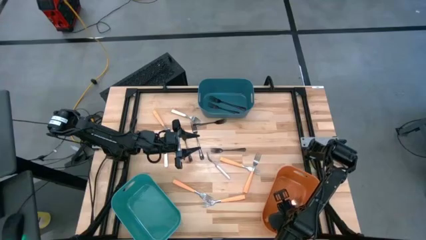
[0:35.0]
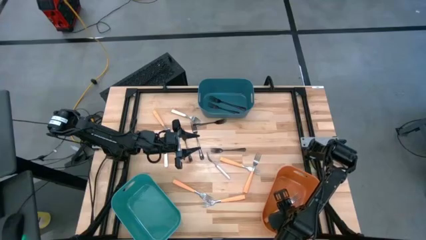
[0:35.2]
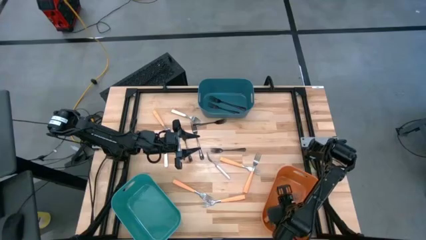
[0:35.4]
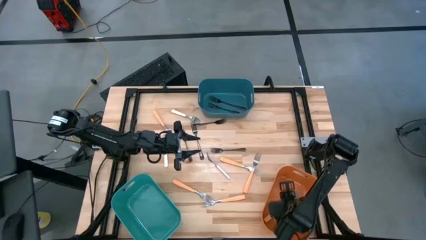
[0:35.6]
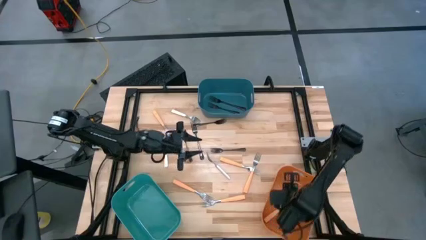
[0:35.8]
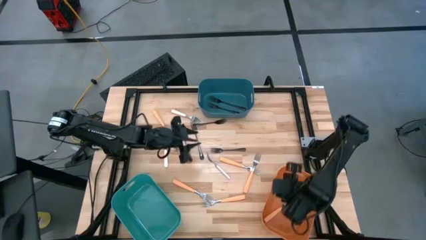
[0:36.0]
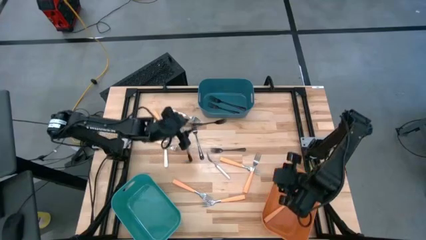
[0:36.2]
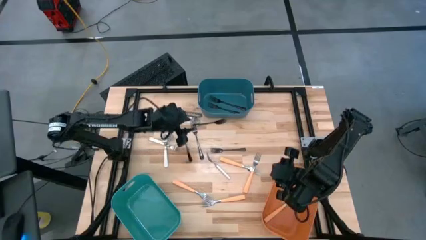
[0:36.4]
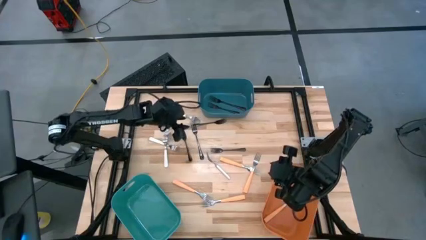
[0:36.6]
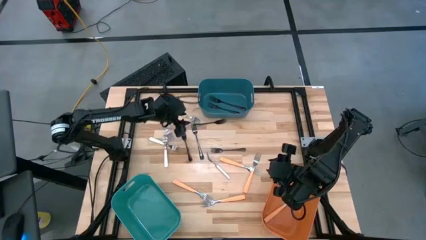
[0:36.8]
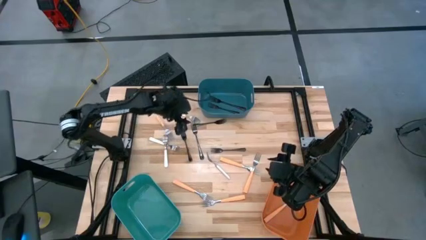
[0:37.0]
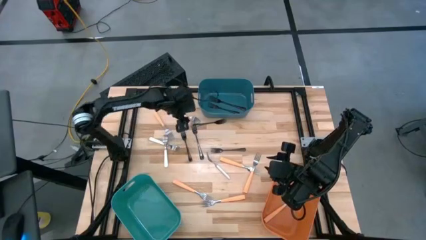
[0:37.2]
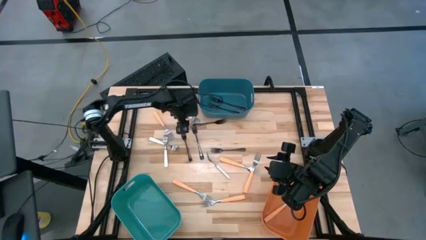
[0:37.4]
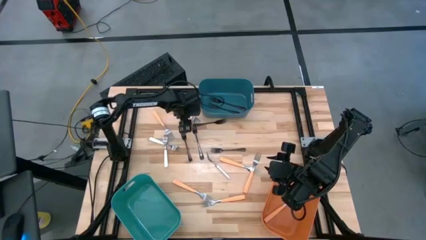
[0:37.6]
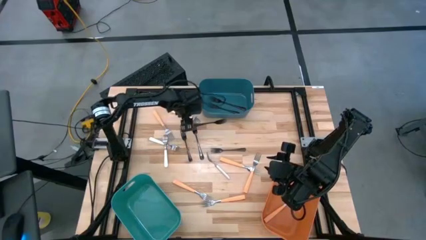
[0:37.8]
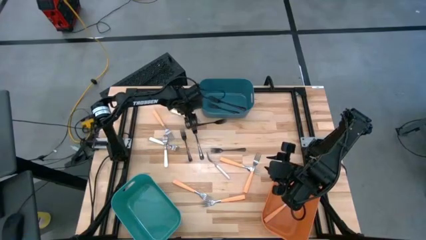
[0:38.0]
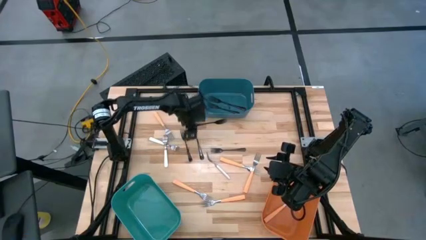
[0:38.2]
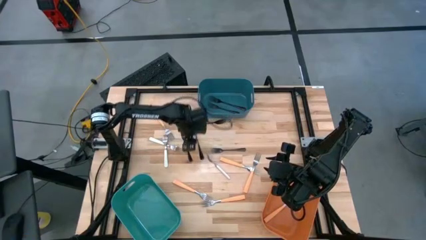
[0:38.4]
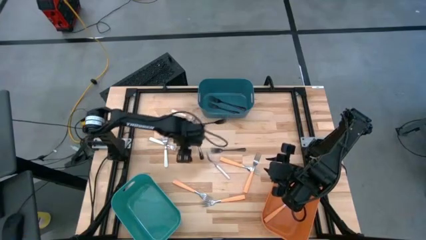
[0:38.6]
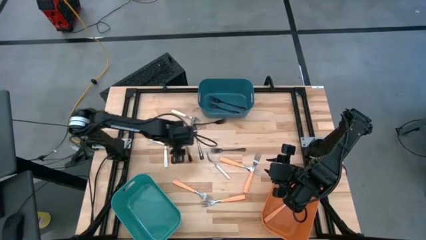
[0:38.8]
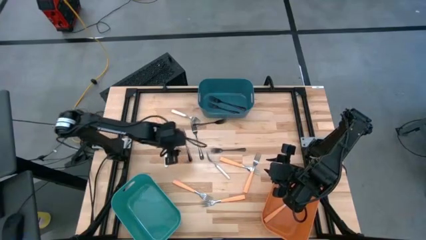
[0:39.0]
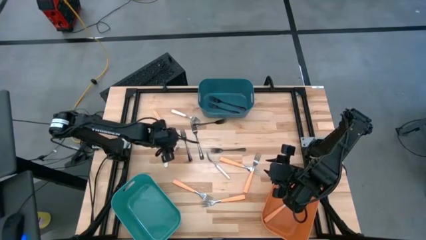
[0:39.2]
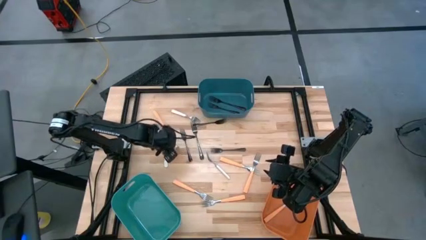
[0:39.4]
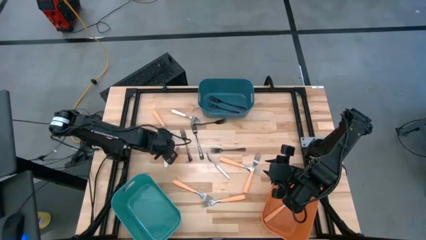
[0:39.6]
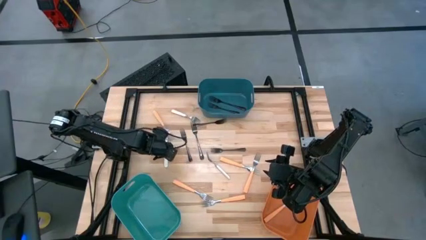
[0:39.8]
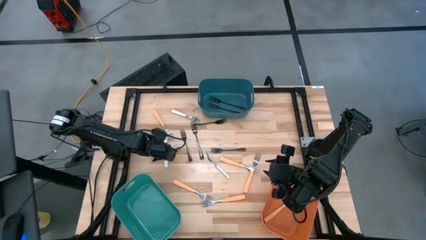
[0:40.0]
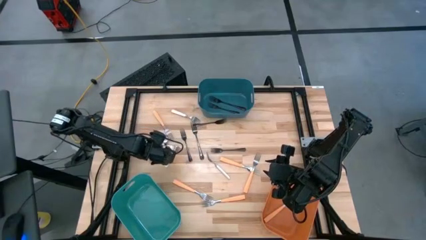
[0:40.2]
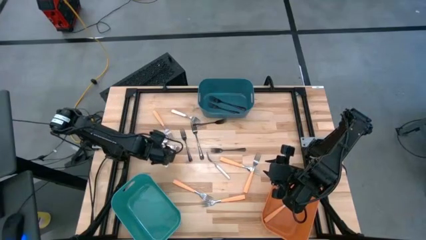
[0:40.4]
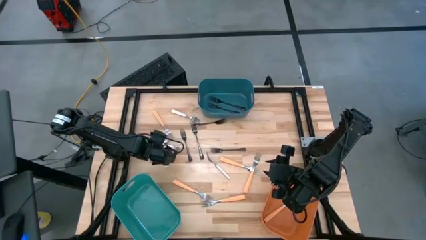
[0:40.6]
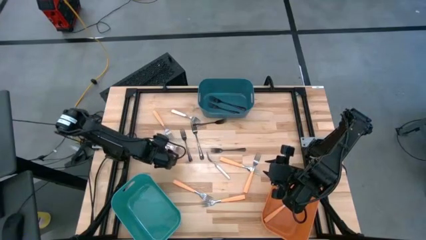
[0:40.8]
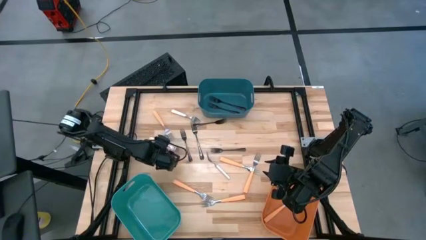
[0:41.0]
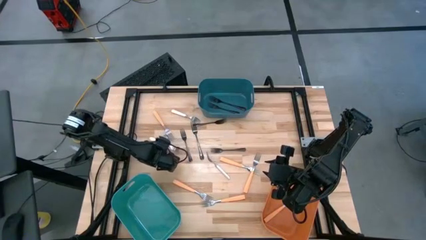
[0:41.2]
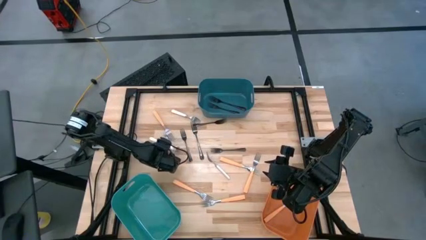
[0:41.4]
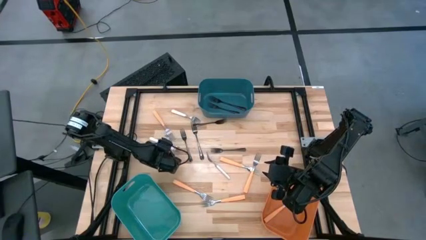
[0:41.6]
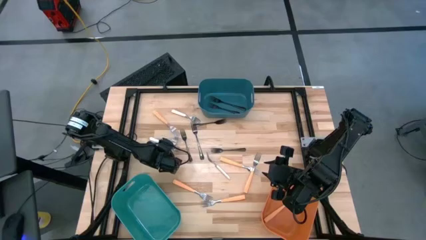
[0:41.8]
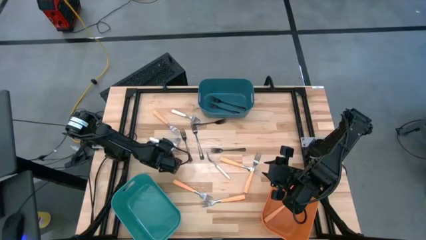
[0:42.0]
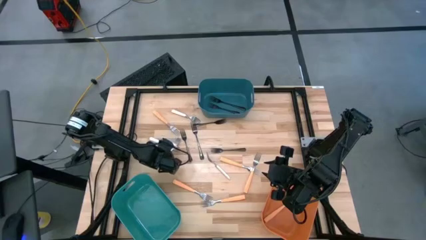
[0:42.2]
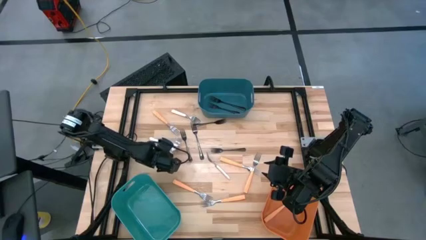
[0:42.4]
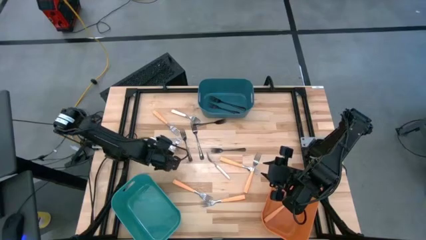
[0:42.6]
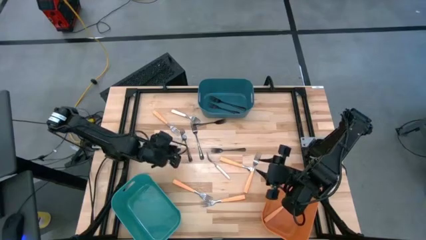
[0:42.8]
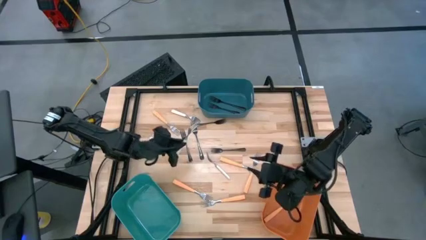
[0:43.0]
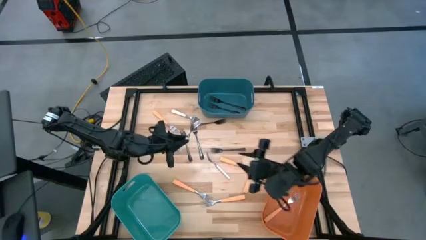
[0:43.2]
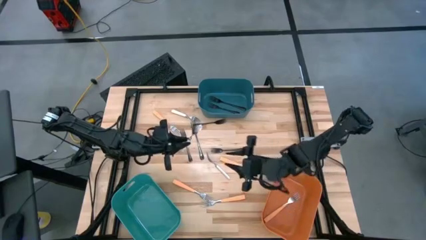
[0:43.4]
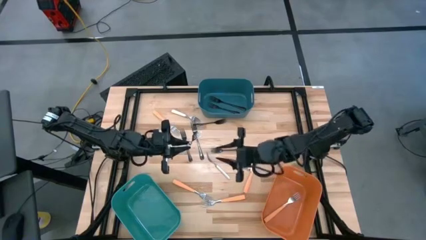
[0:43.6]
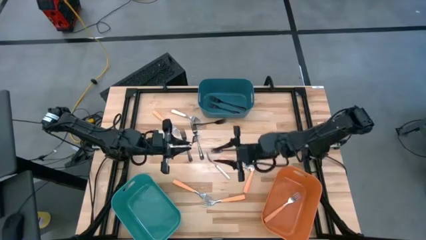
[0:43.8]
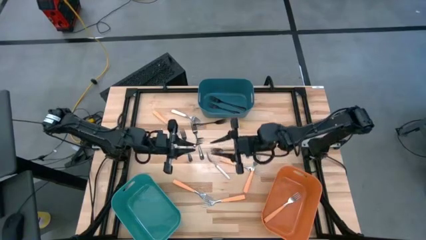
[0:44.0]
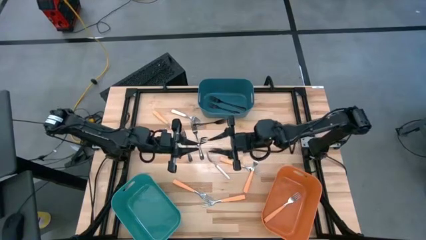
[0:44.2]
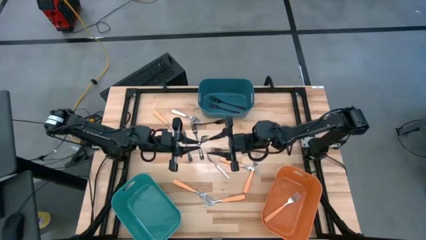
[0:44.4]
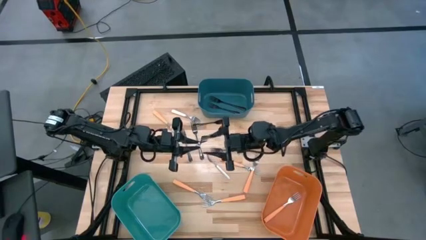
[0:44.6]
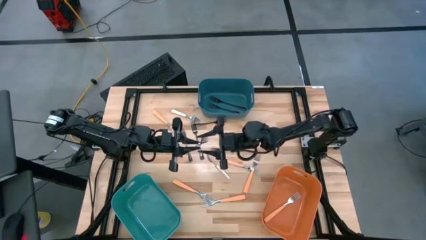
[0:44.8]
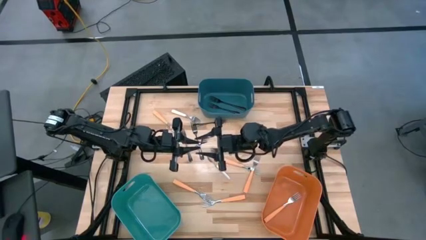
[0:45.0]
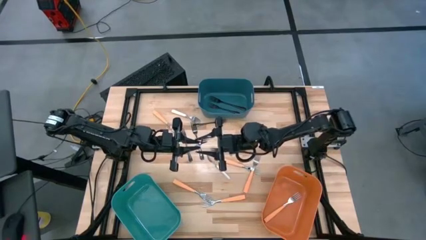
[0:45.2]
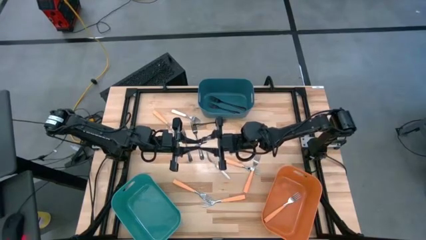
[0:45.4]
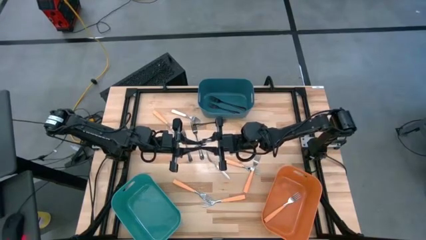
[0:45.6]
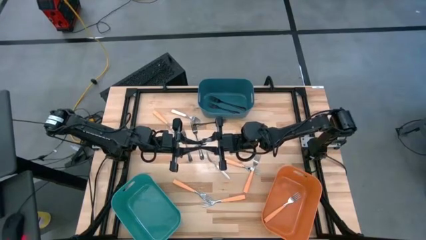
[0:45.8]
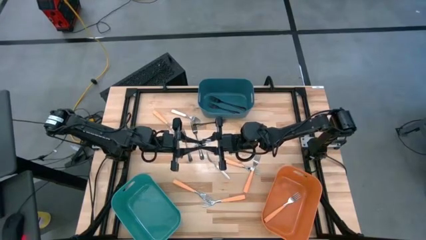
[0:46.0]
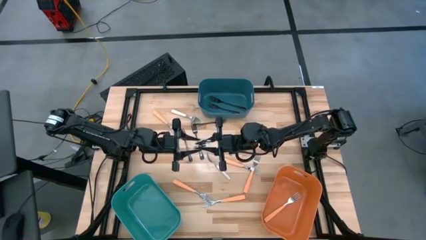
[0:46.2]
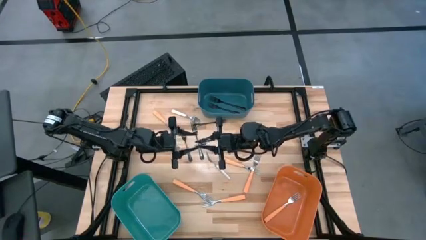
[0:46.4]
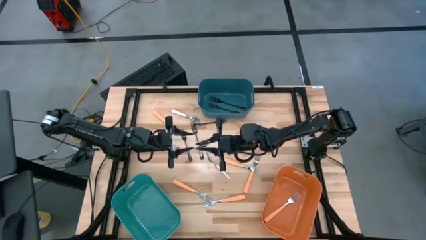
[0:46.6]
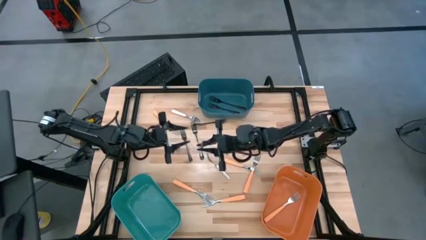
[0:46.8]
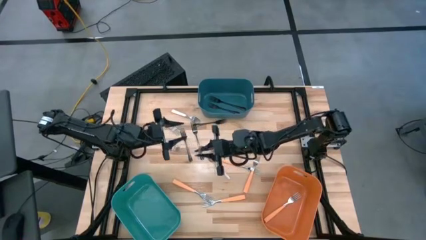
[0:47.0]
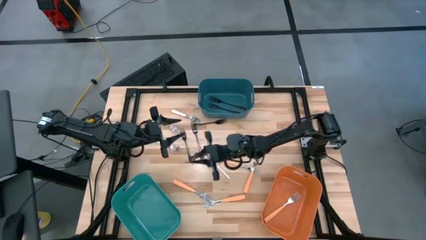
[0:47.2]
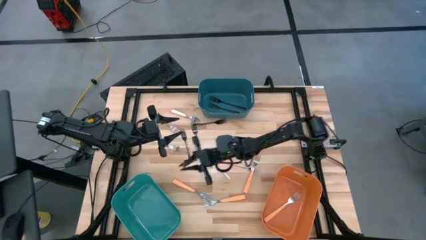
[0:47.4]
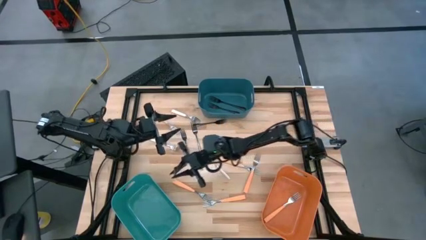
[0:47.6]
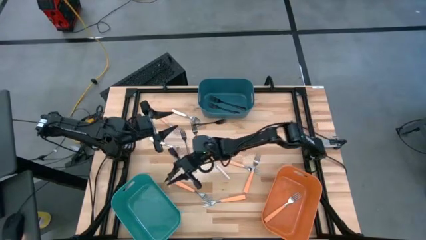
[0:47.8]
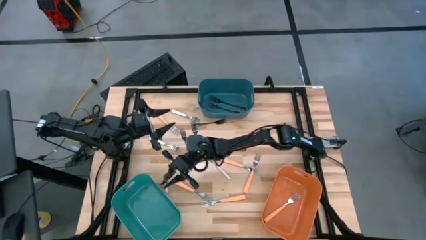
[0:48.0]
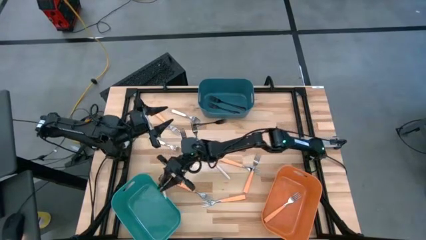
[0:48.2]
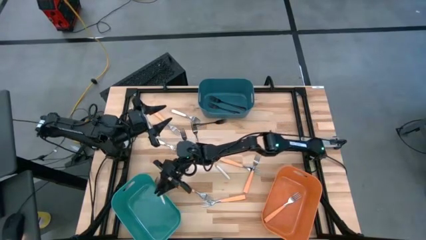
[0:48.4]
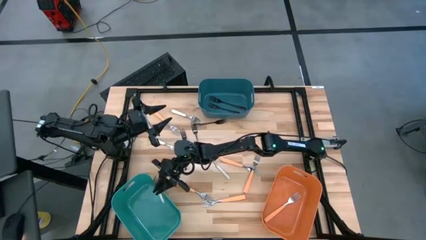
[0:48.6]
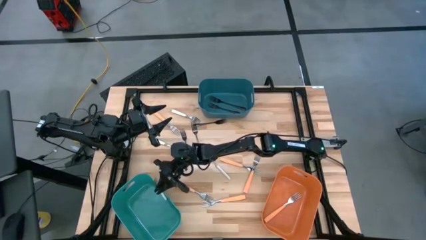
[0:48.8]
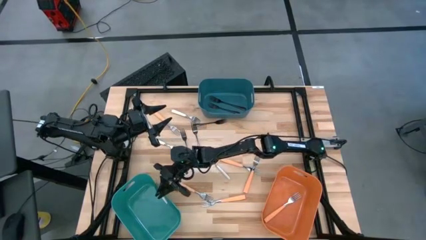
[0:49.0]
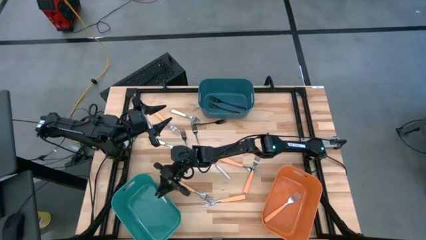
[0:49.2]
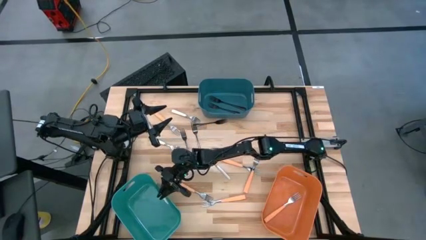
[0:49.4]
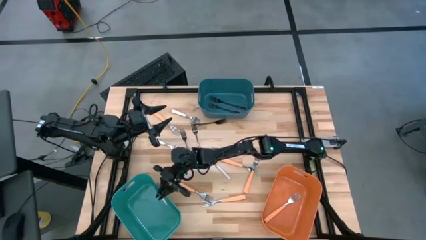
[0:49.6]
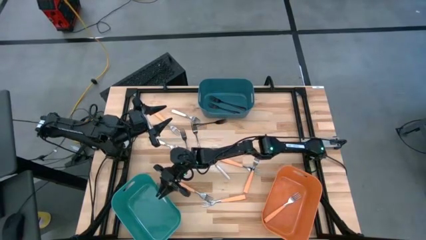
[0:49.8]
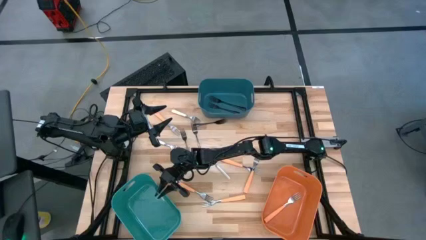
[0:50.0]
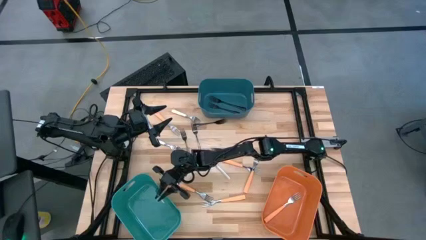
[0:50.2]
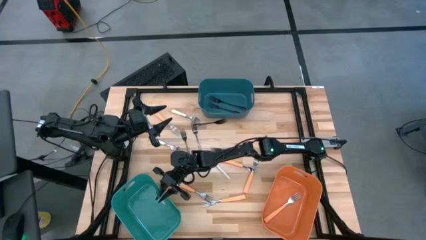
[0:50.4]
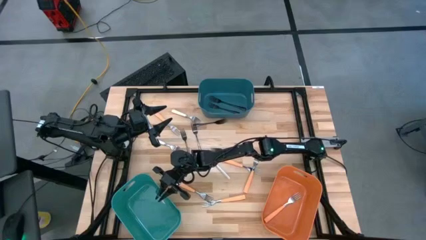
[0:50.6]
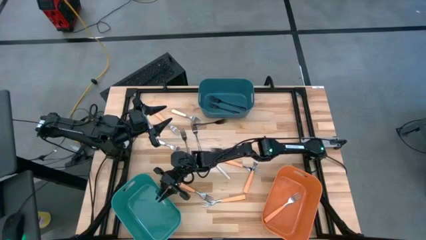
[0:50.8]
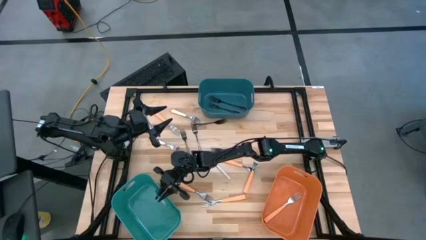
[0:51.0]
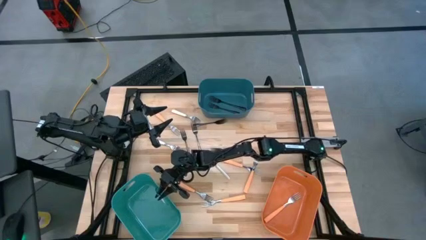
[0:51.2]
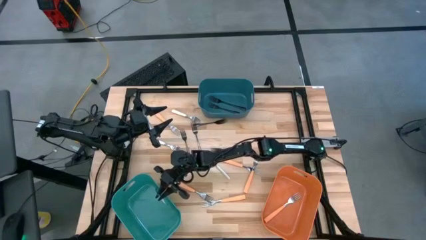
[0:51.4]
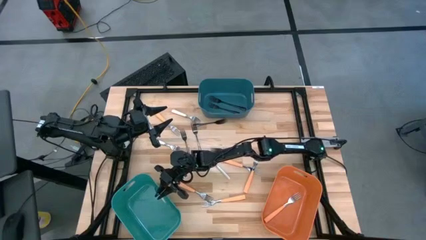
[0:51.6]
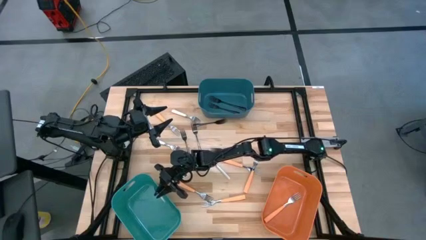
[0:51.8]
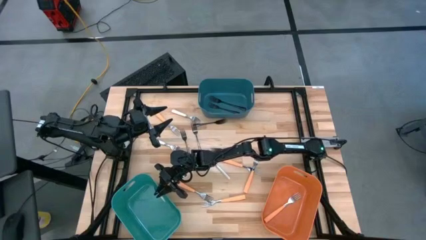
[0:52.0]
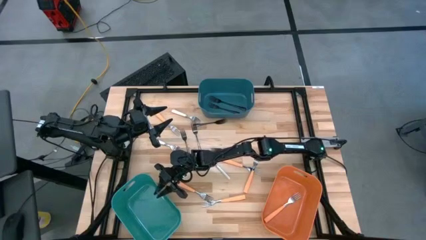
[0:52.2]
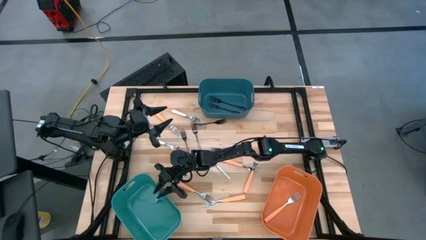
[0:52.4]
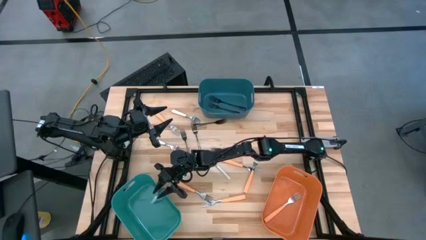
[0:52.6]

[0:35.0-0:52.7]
Task: Sort silverware by color (type)
Put the white fork into the green blue bin
